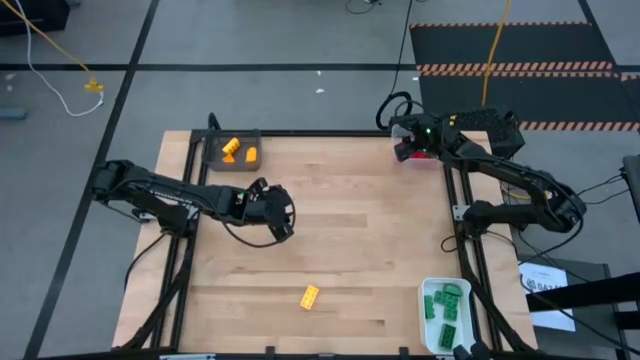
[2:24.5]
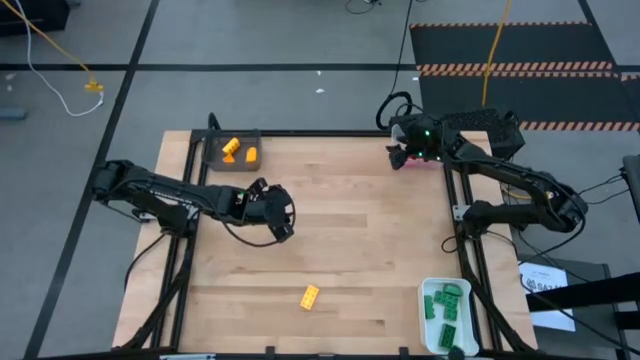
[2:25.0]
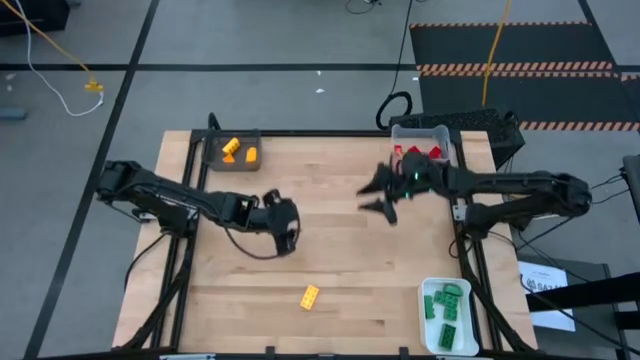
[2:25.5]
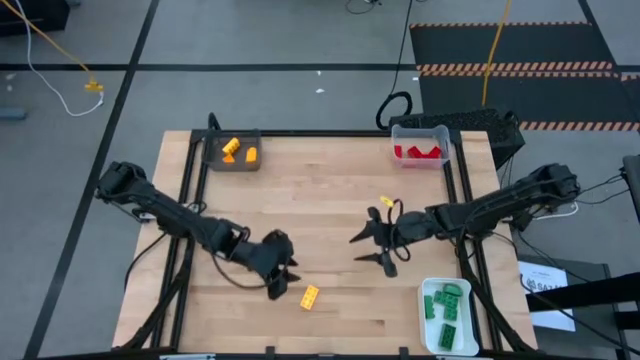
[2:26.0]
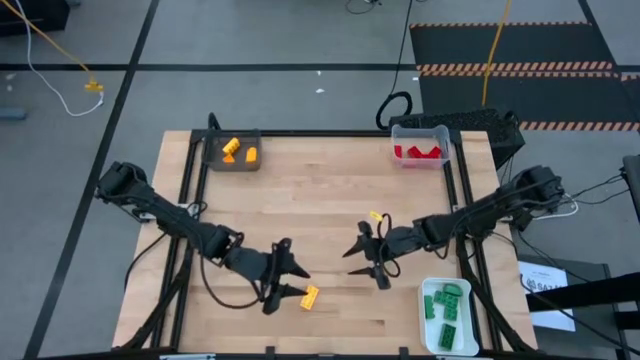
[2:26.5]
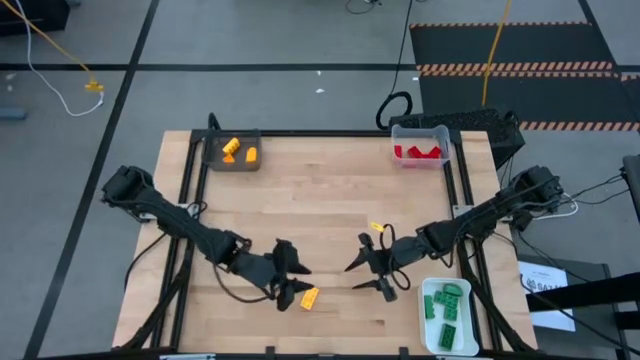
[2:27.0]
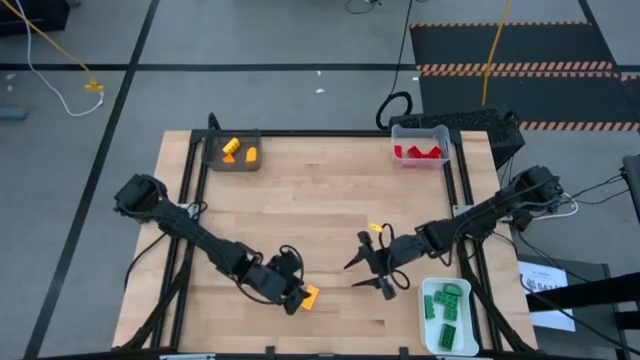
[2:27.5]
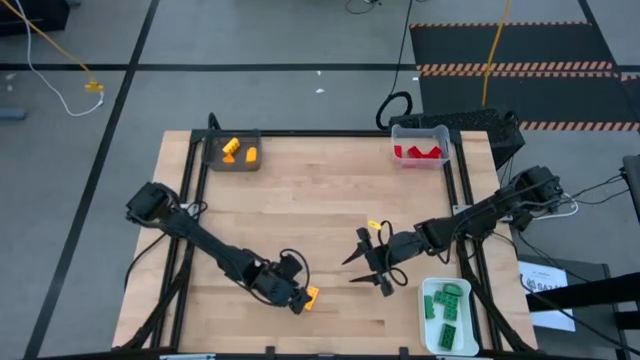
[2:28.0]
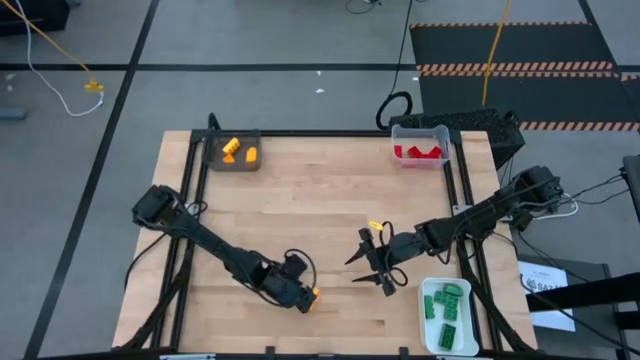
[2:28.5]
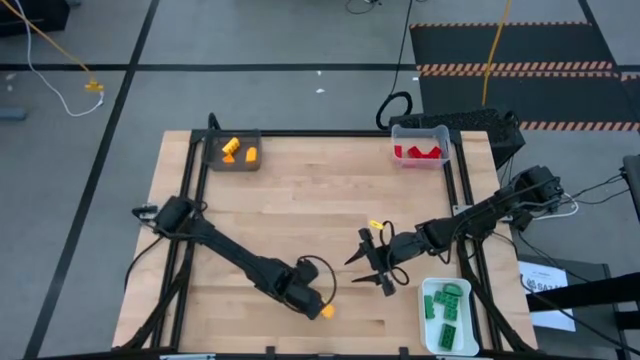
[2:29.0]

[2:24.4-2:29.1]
Task: Sort & place blocks by color
Put the yellow gamepiece into the black bin

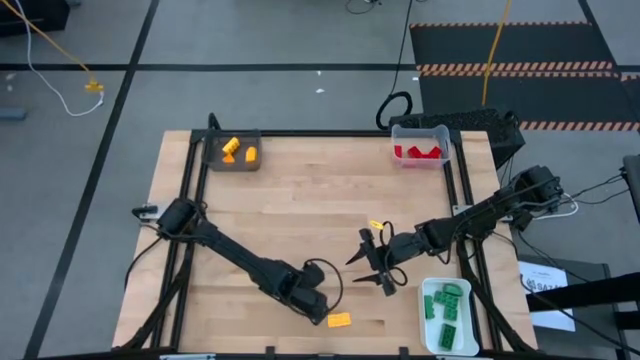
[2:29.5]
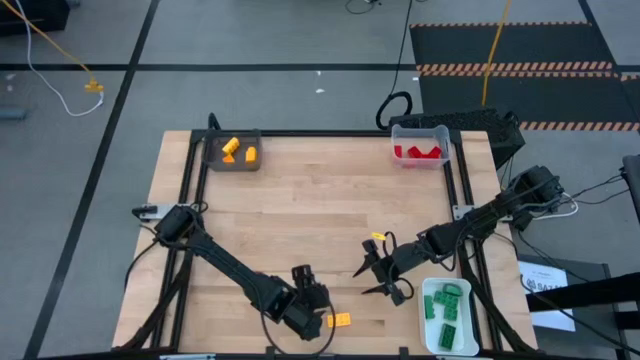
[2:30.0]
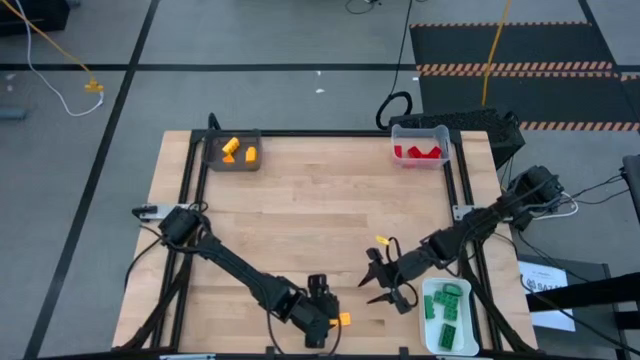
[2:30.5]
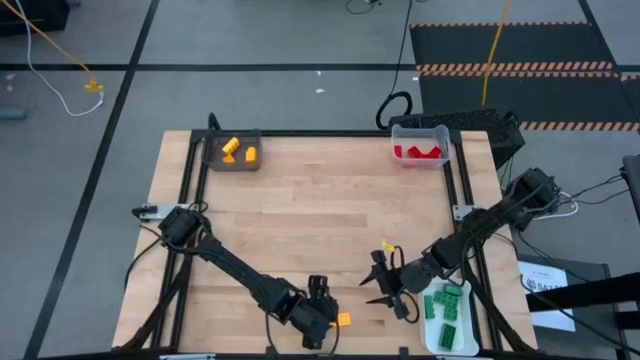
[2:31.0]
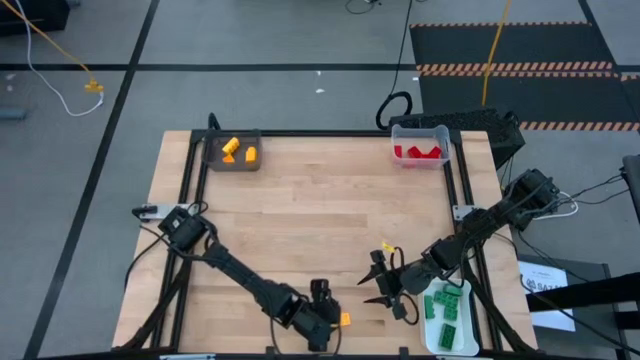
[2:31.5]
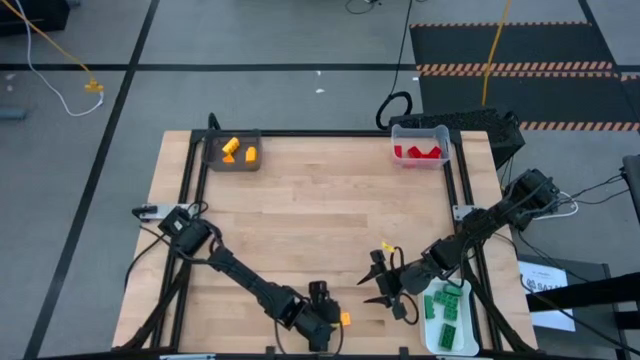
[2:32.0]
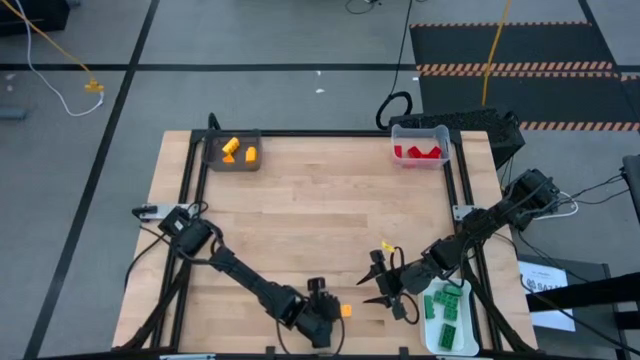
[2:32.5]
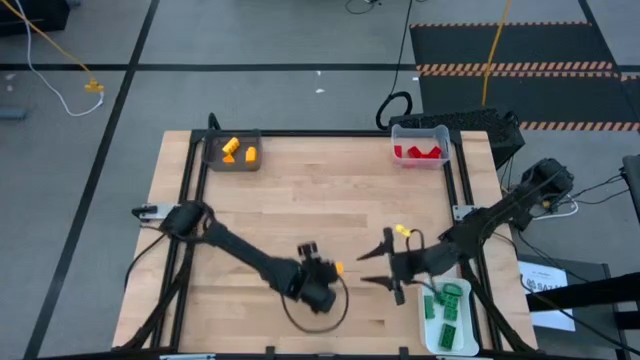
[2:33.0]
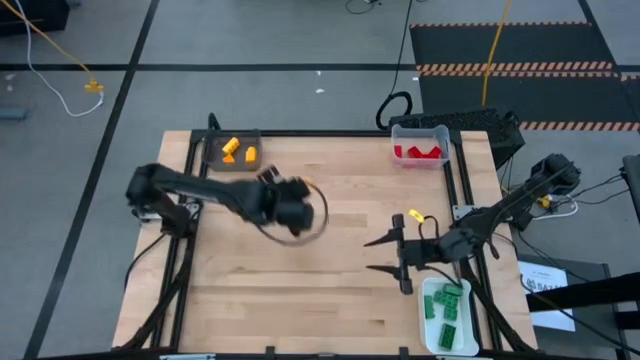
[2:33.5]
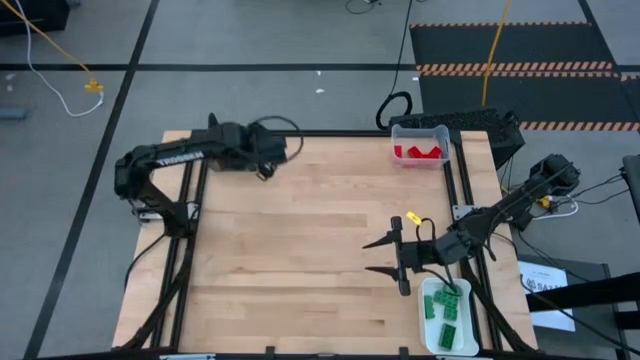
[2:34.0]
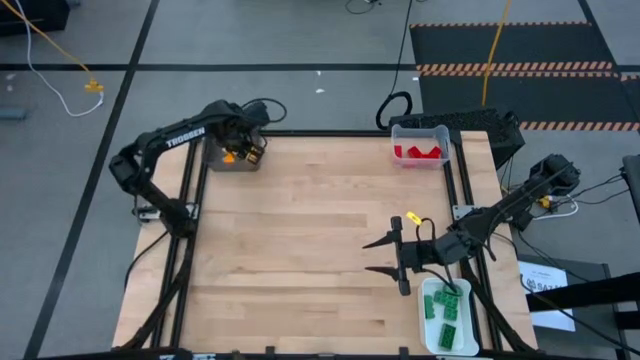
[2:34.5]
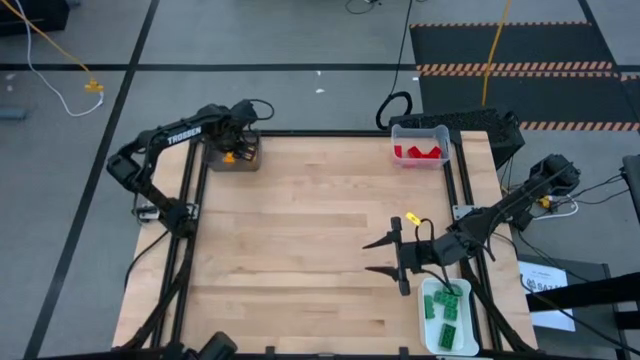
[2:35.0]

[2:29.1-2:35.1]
Put the yellow gamepiece into the black bin

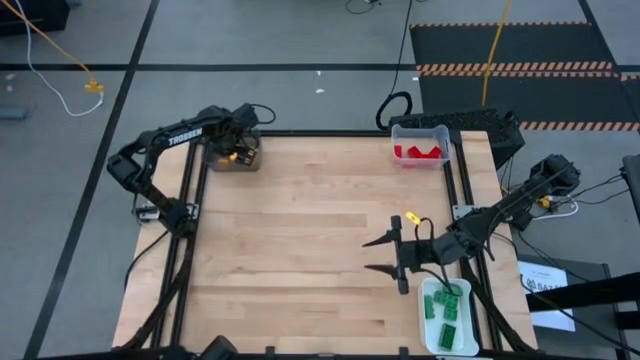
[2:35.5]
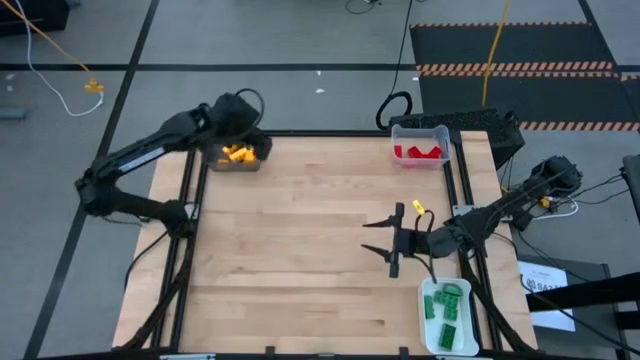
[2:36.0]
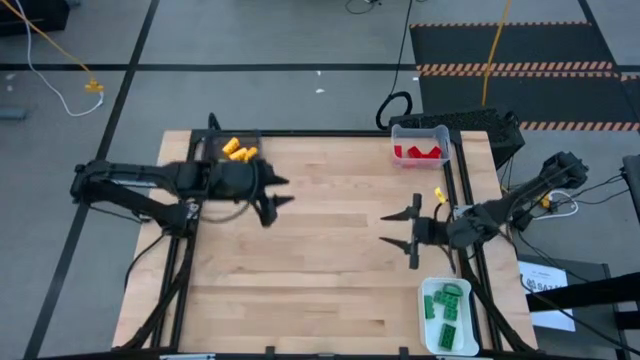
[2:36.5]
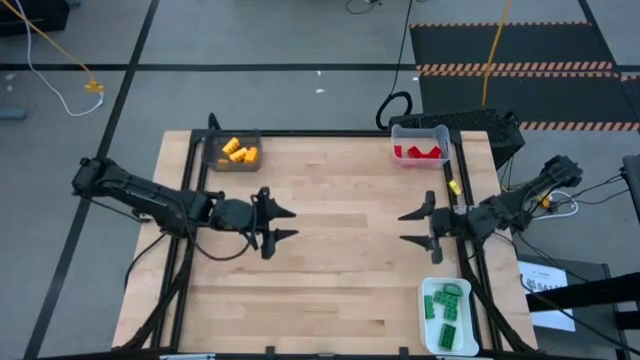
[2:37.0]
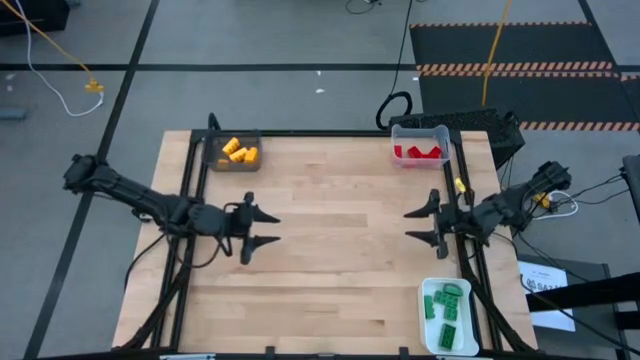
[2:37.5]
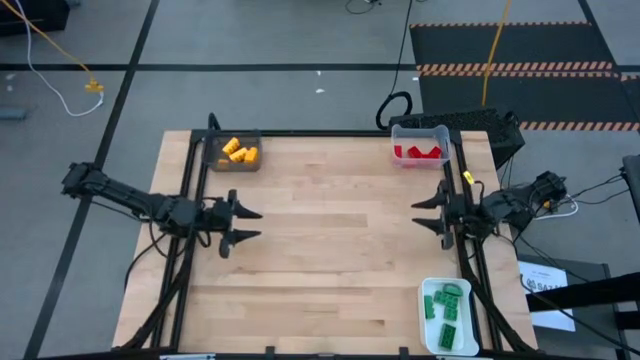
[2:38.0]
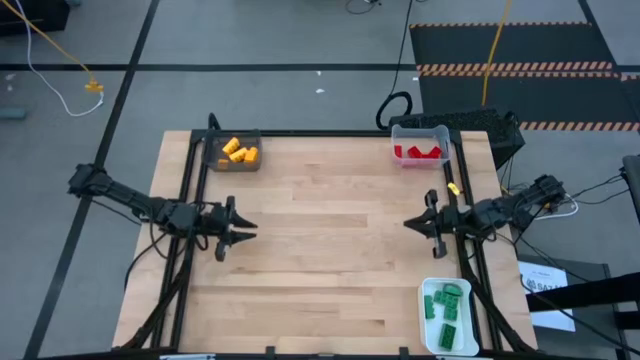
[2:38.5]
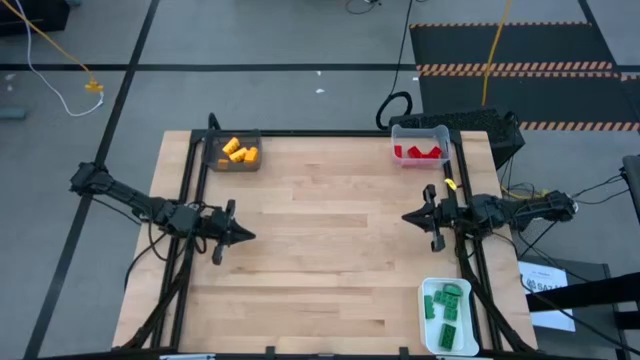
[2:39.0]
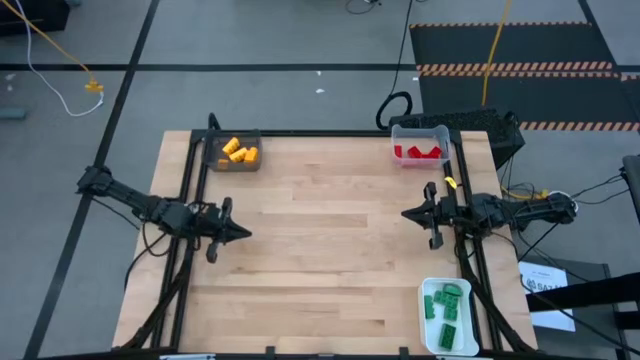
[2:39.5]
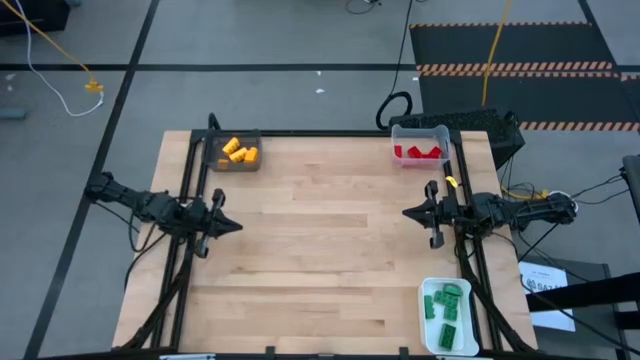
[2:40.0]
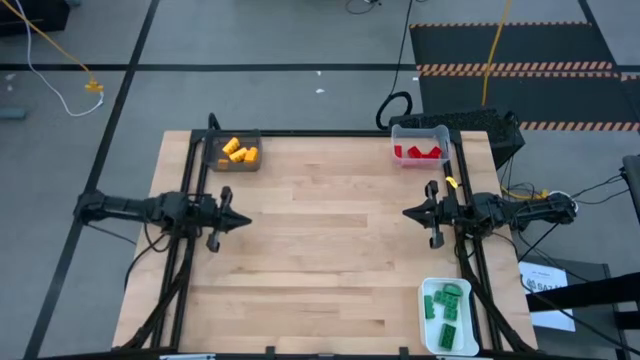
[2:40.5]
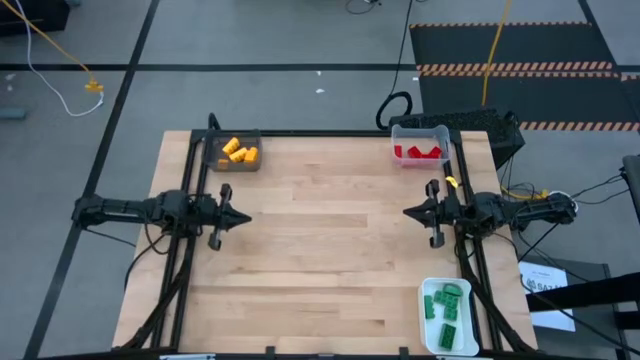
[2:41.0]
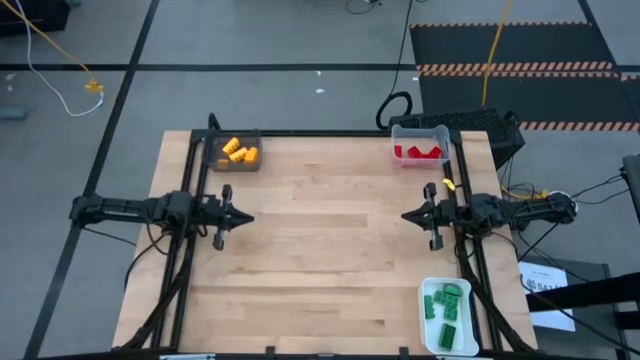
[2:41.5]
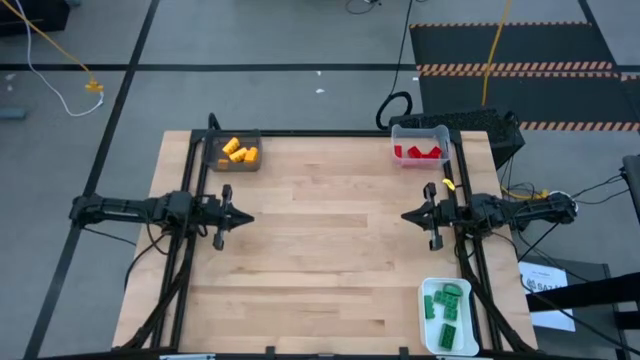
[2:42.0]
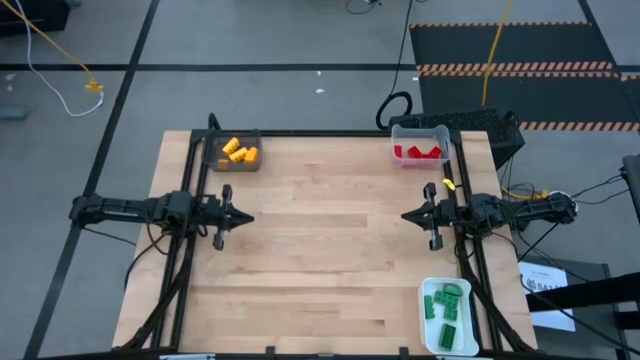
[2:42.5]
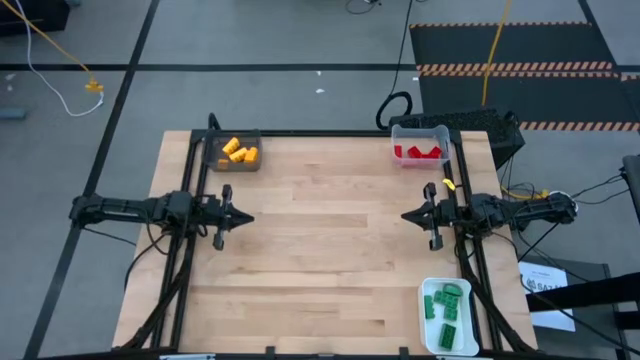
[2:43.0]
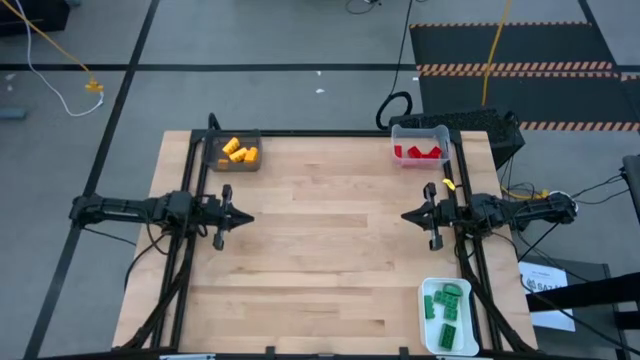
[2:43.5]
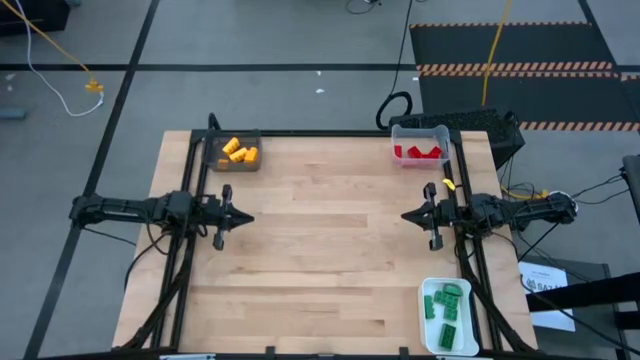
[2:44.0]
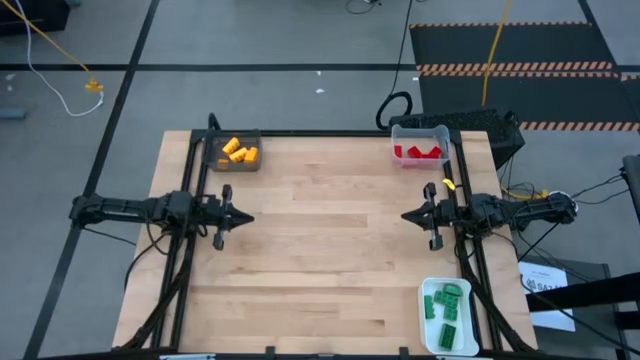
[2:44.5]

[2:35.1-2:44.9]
Return to Home Position
